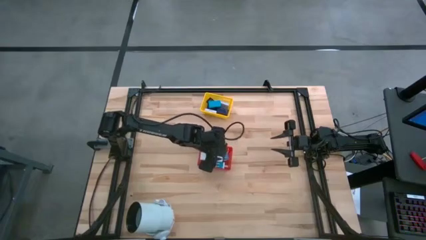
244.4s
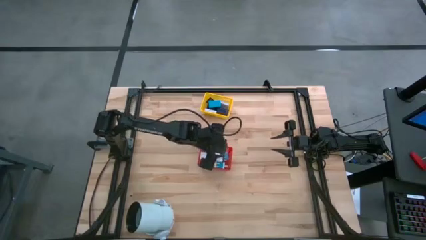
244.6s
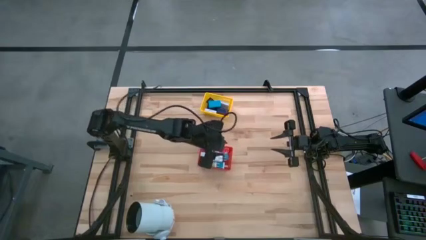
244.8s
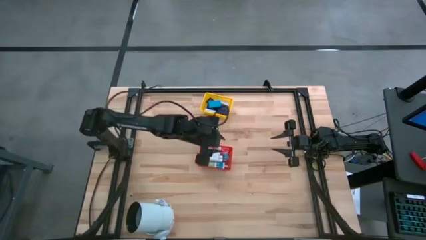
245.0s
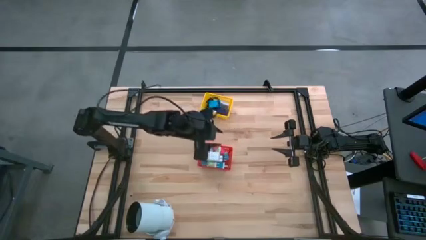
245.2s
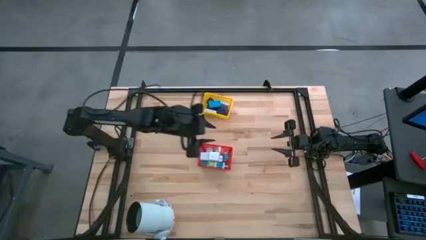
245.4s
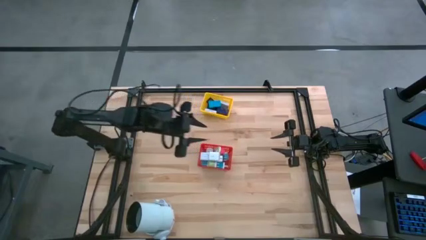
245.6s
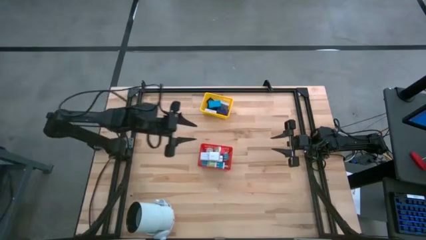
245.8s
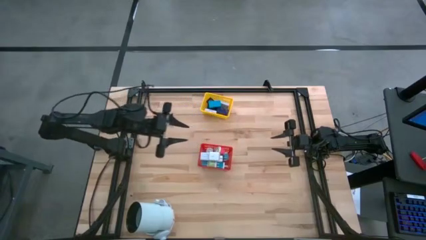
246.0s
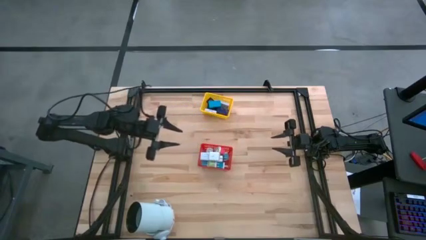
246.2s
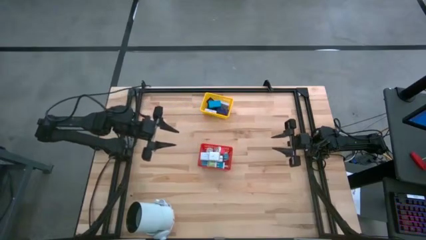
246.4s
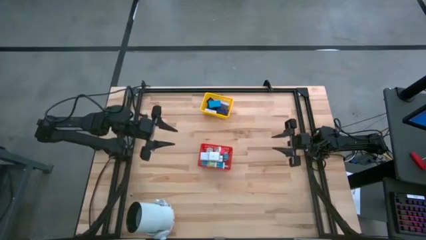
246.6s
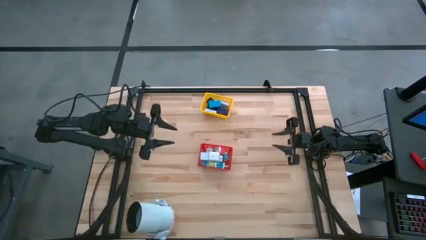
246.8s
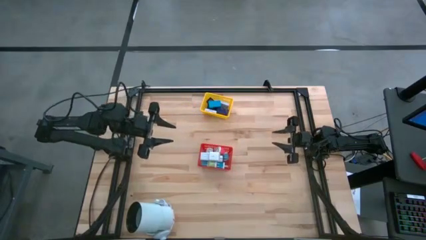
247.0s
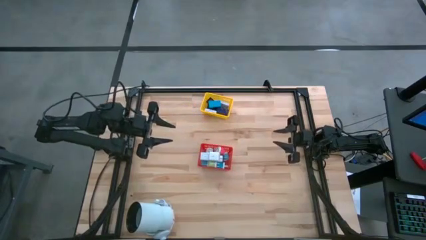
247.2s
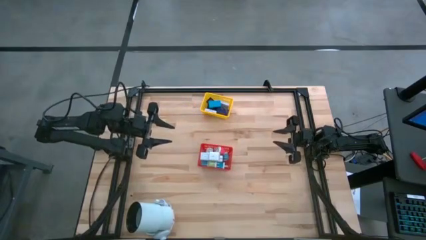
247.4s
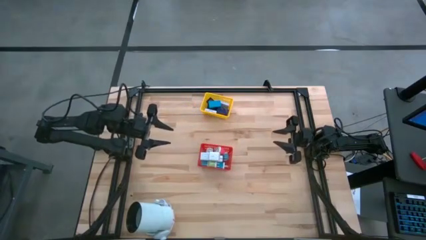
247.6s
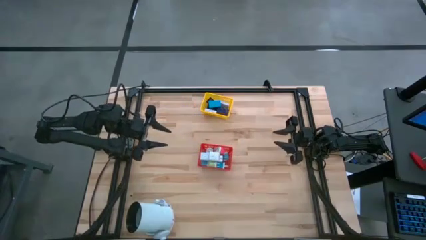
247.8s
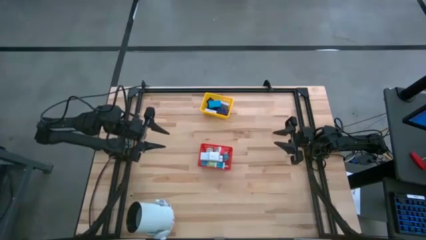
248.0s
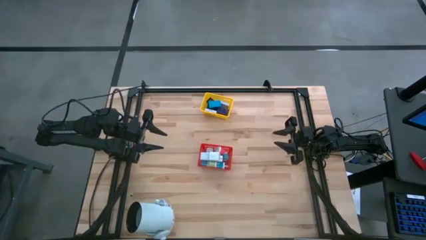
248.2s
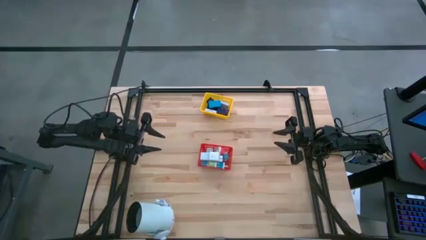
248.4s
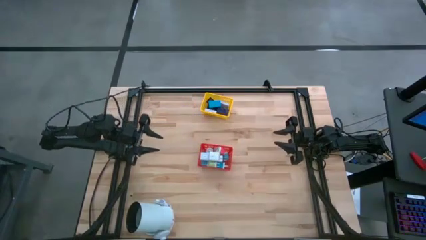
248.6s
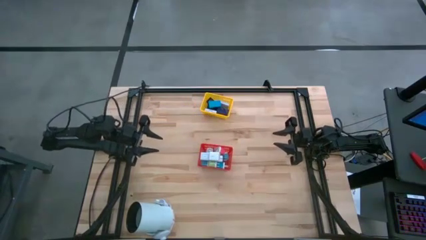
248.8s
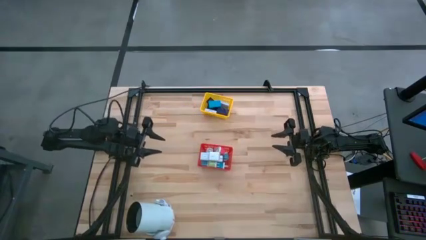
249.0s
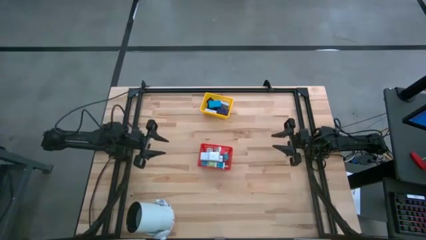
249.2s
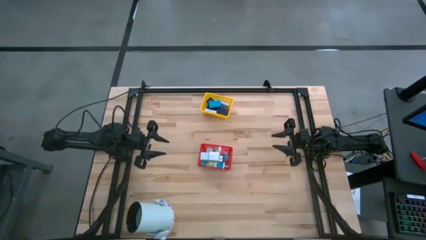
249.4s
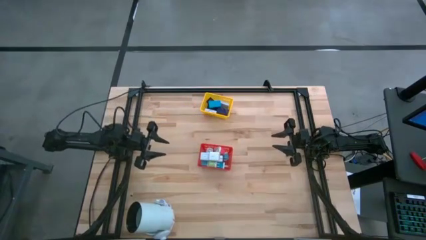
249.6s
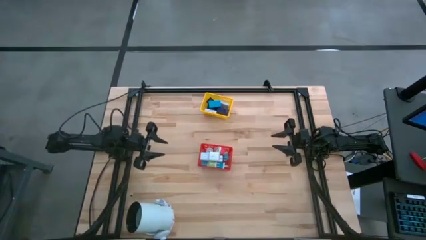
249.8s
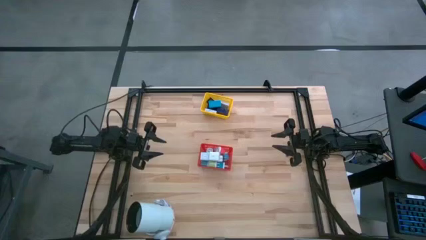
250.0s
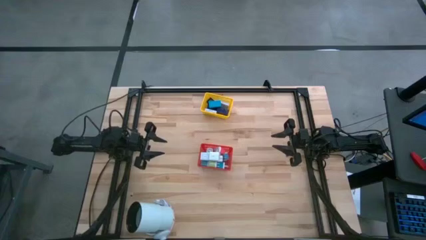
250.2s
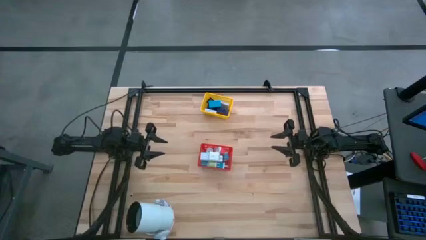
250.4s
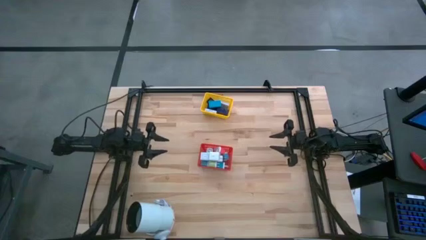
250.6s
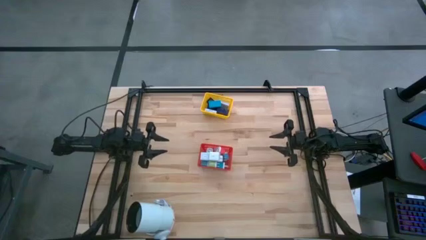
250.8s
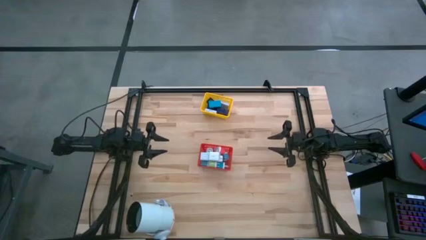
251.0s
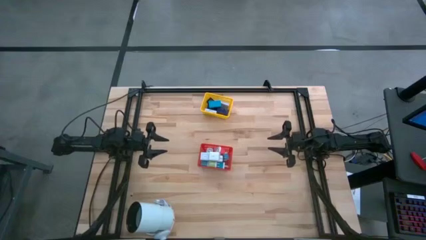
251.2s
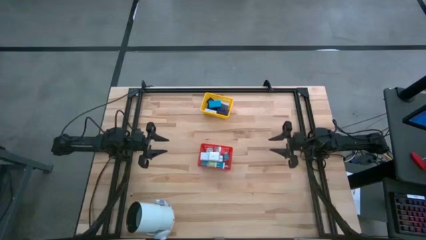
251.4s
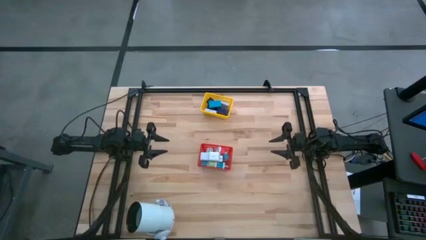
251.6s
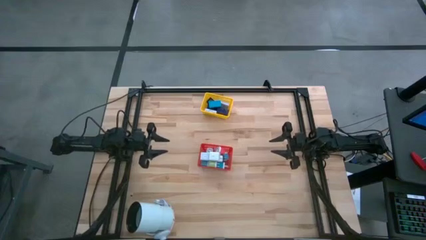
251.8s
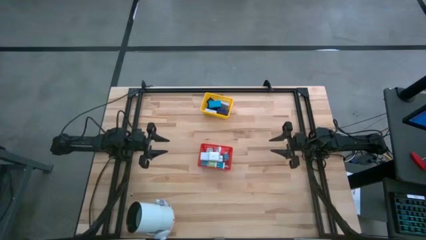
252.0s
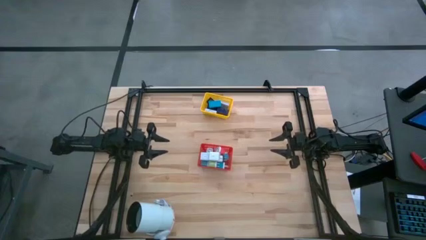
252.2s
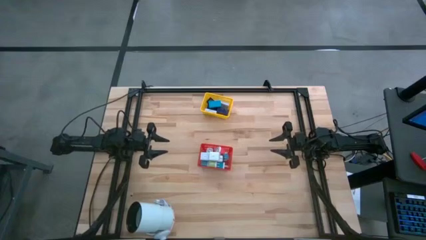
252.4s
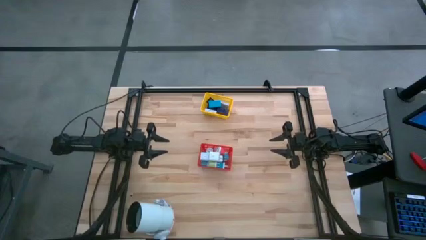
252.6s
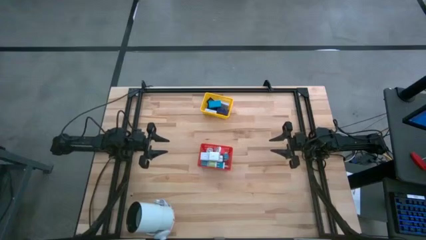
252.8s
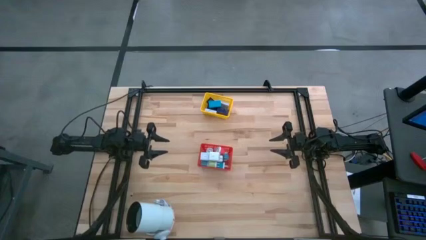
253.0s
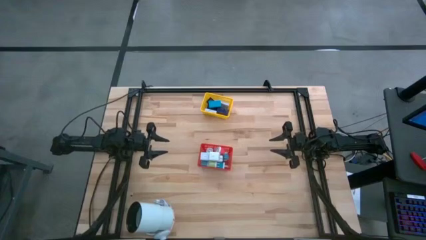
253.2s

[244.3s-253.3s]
Task: Pick & Place Office items
Return to Home Position

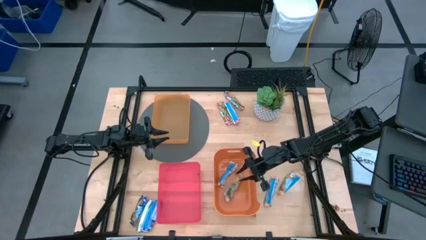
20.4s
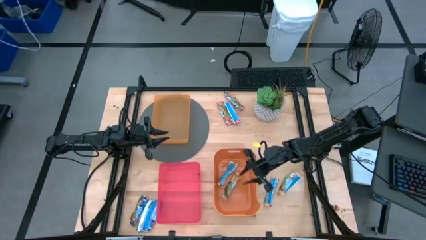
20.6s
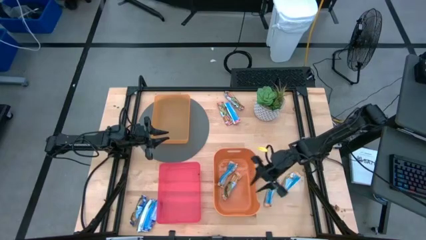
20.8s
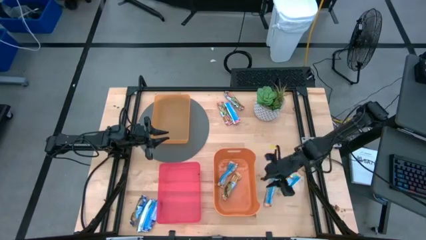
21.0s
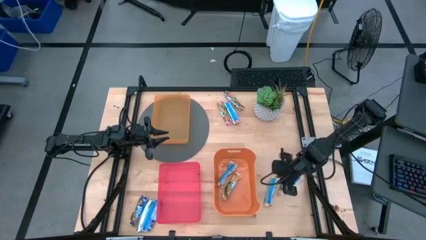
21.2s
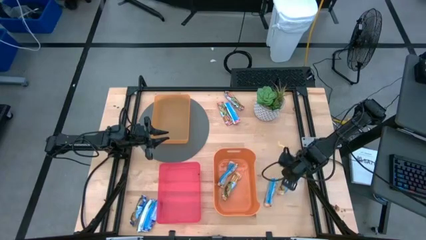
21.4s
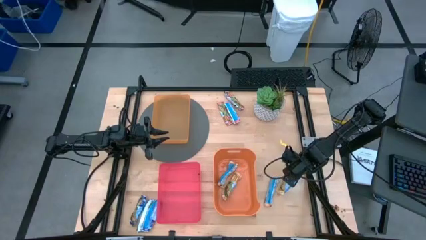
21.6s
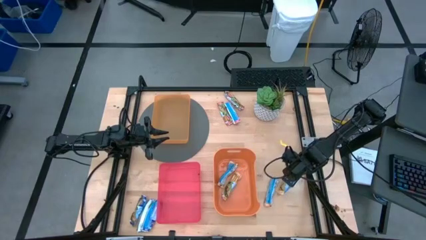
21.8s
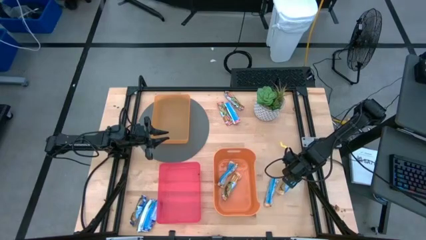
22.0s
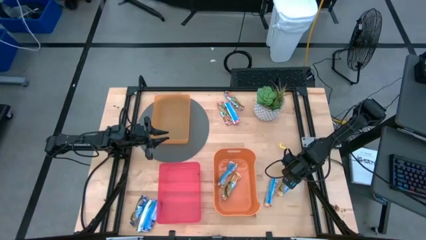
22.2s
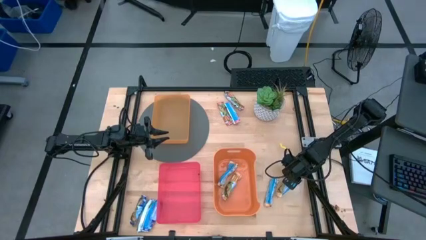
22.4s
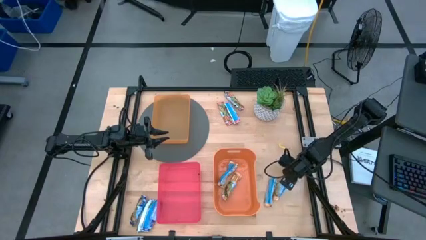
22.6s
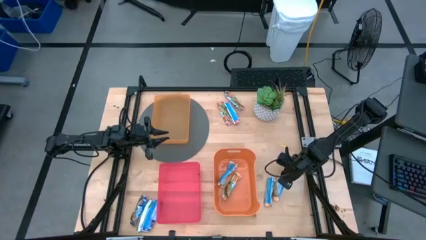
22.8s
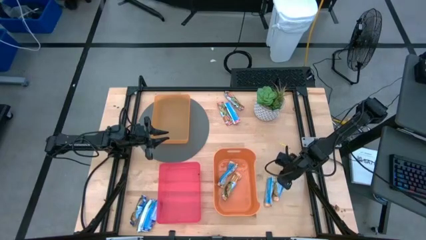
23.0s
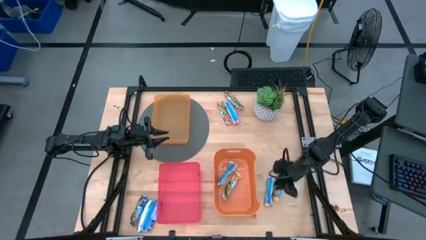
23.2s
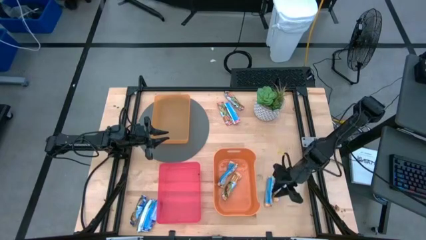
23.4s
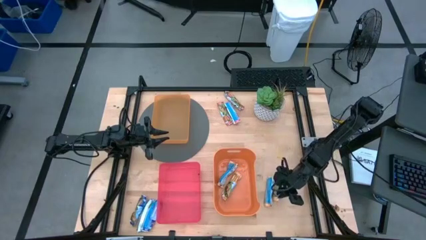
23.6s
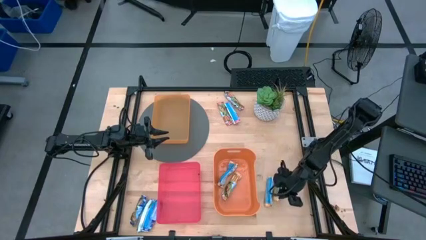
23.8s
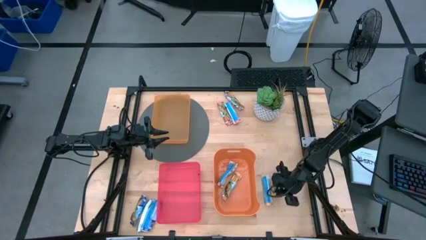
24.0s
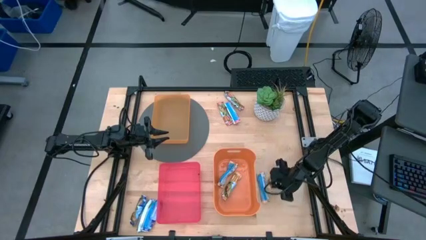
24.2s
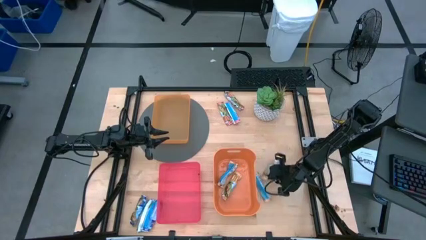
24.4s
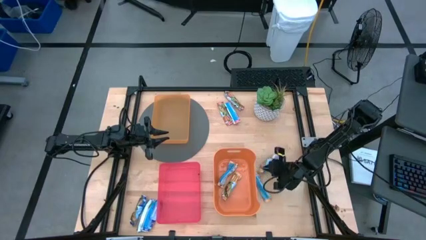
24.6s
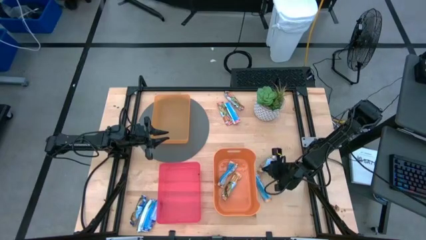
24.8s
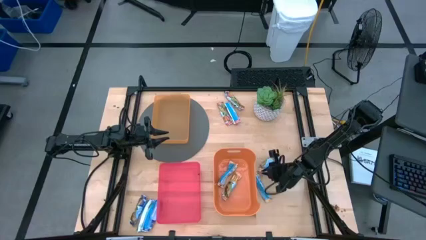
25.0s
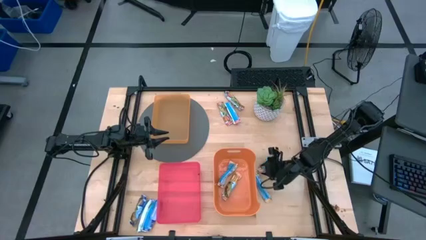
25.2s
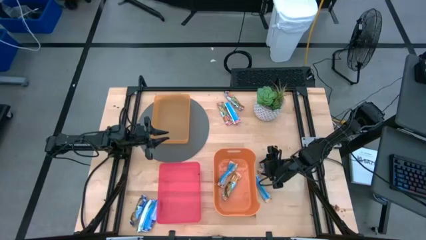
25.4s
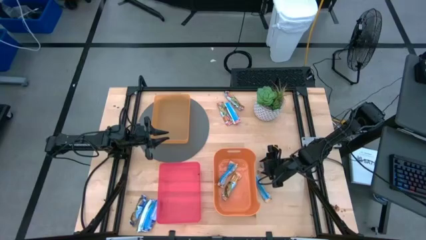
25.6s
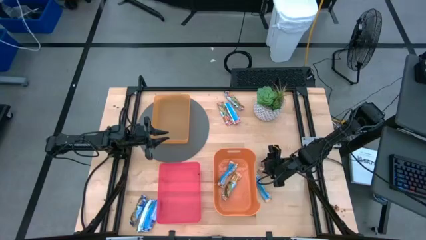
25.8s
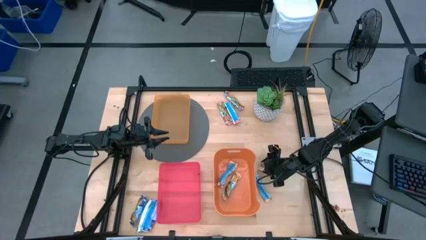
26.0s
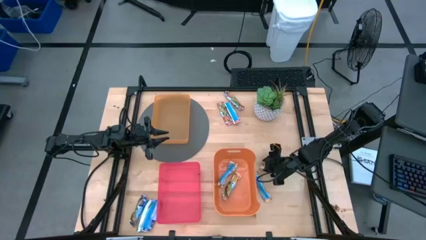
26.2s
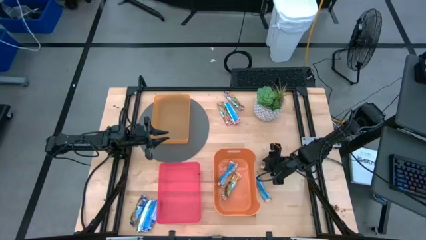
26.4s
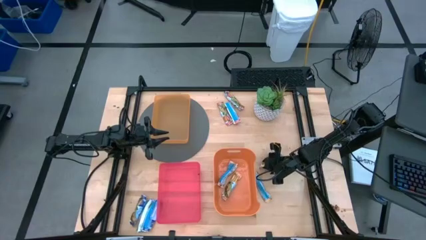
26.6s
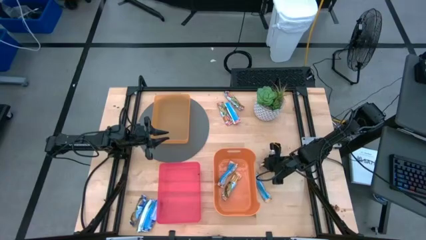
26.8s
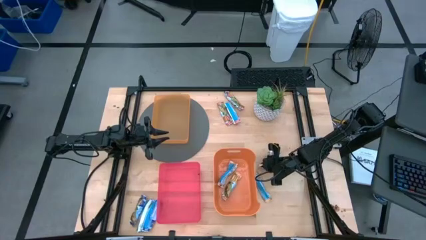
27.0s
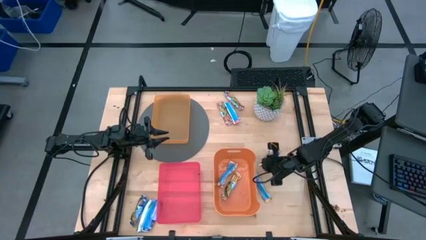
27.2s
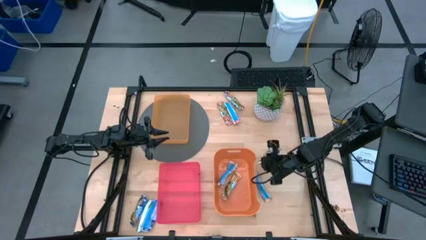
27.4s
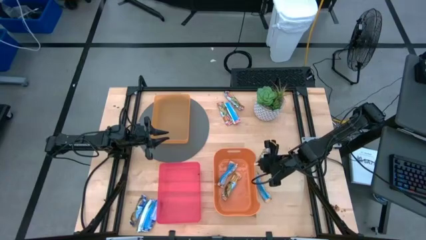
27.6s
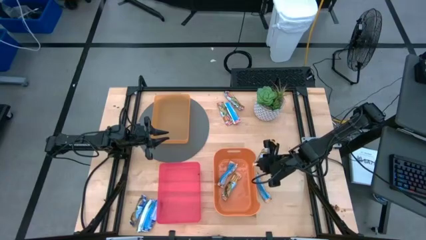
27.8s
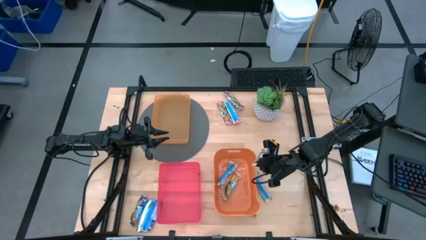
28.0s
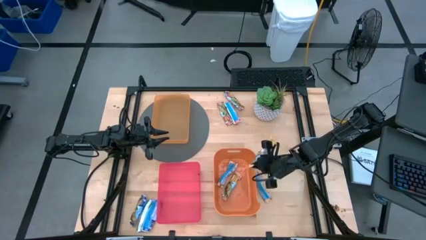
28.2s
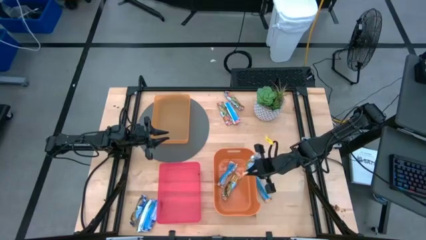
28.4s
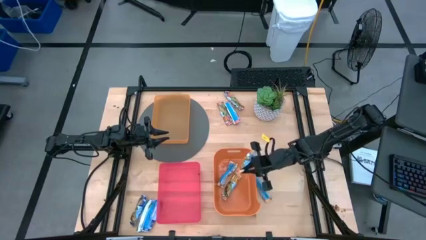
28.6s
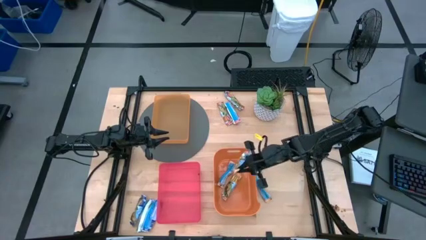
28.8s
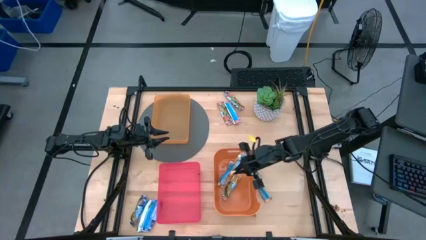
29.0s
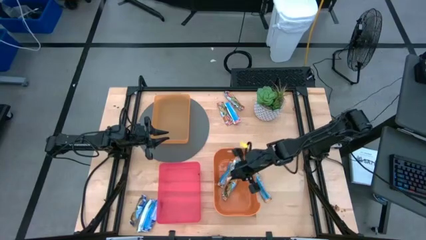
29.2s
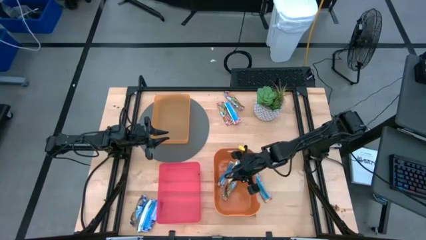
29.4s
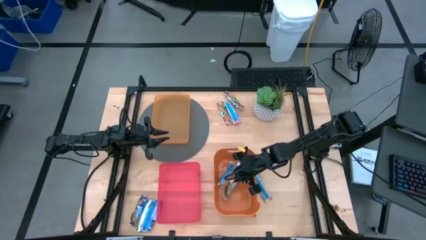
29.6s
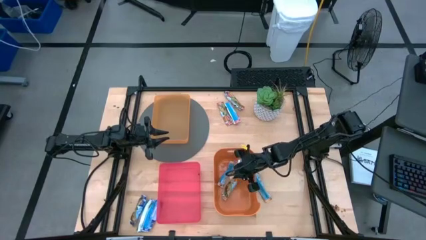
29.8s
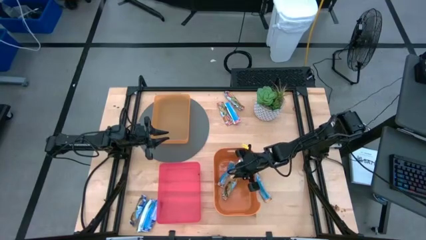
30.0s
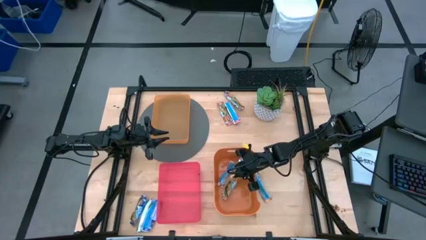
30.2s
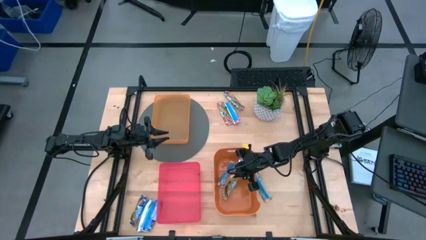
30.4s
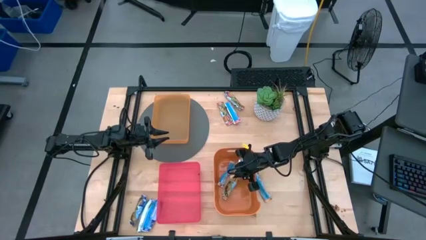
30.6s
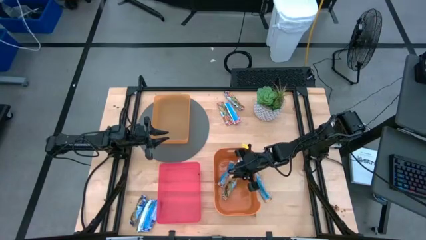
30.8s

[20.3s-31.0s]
Task: Pick and place Granola Bars by type
Put the yellow granola bar into the orange bin
